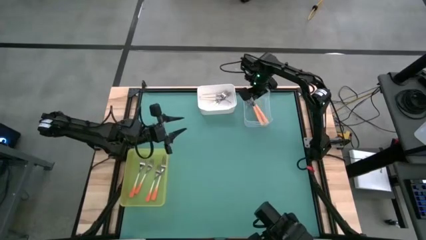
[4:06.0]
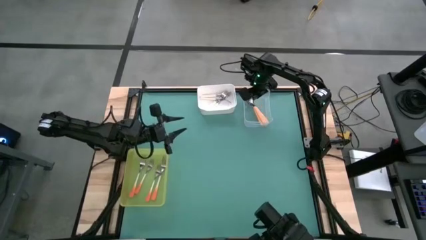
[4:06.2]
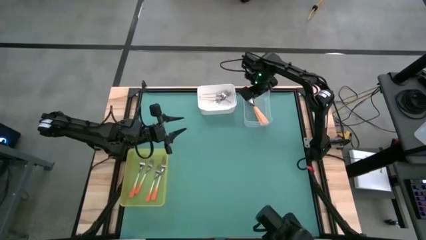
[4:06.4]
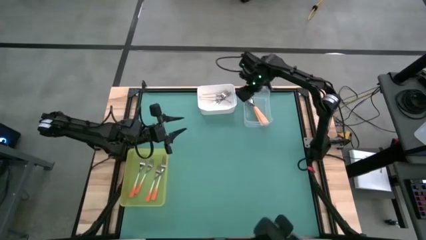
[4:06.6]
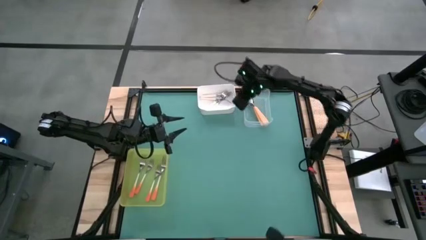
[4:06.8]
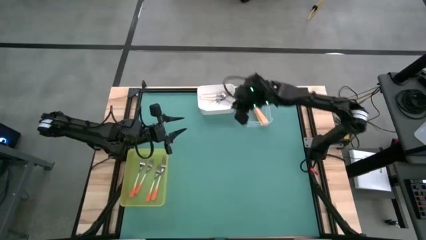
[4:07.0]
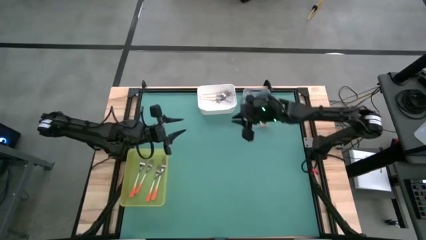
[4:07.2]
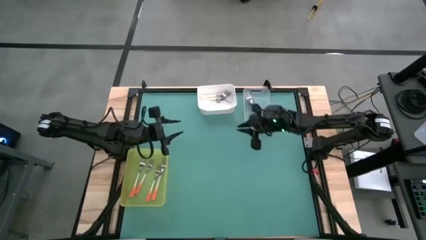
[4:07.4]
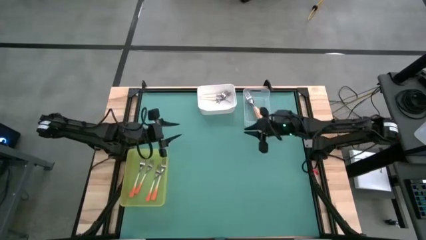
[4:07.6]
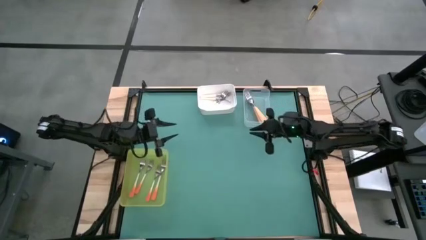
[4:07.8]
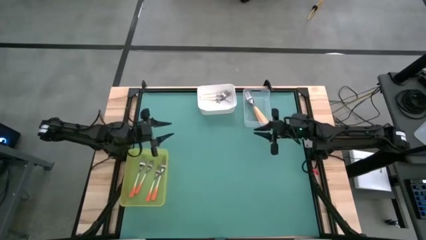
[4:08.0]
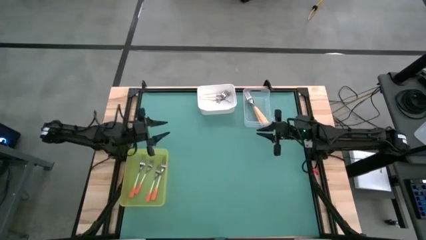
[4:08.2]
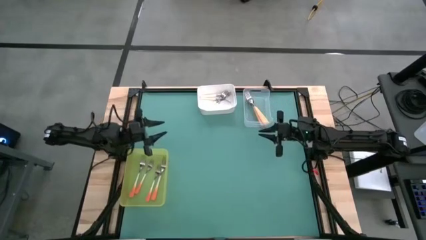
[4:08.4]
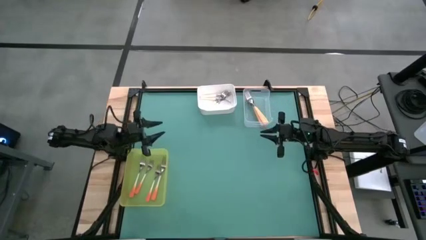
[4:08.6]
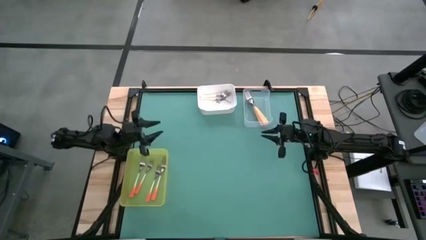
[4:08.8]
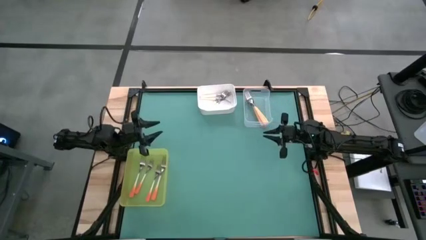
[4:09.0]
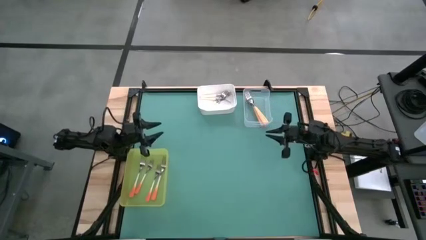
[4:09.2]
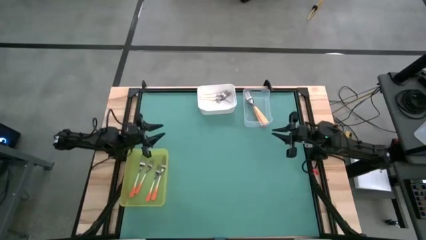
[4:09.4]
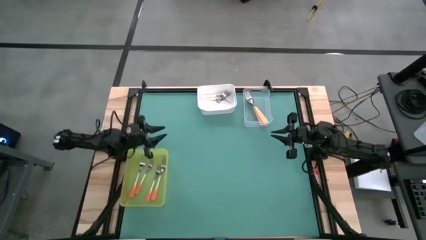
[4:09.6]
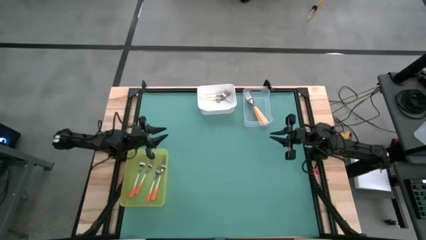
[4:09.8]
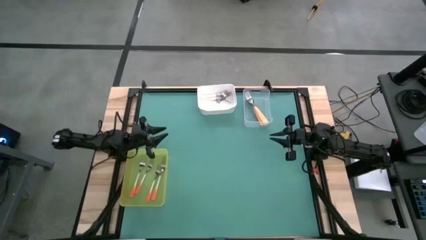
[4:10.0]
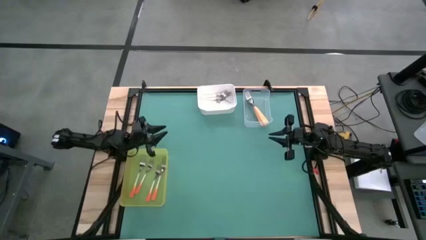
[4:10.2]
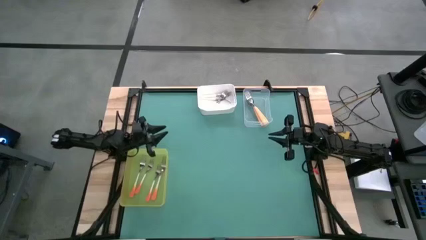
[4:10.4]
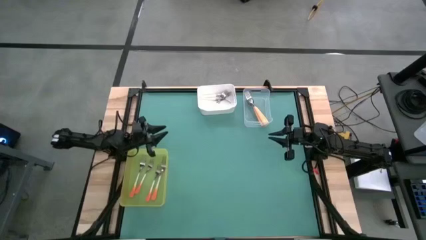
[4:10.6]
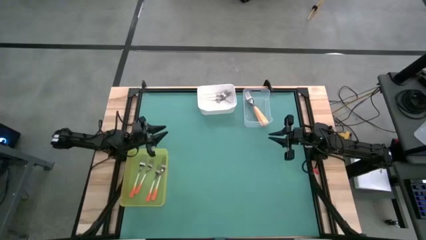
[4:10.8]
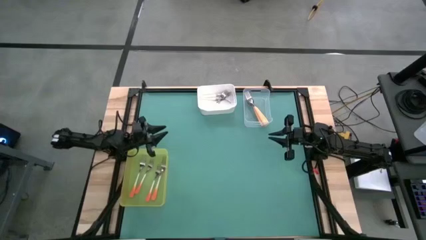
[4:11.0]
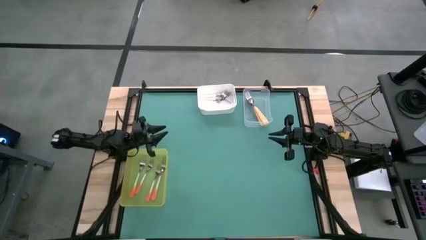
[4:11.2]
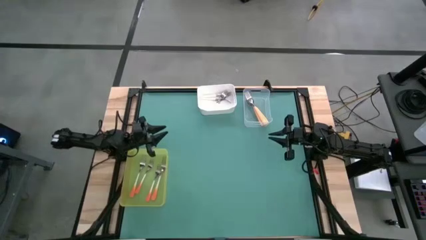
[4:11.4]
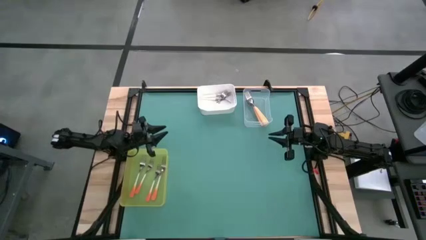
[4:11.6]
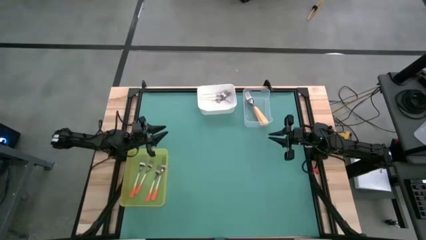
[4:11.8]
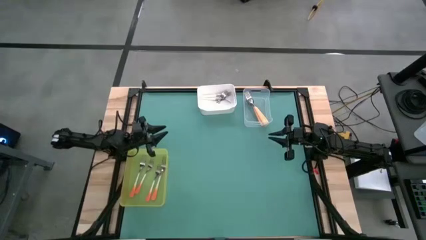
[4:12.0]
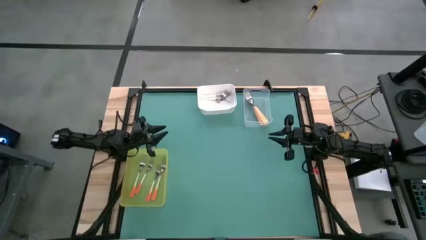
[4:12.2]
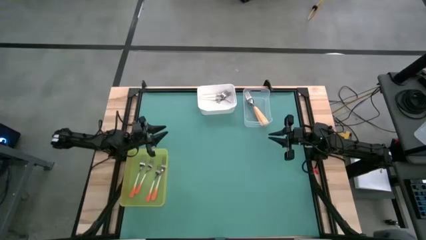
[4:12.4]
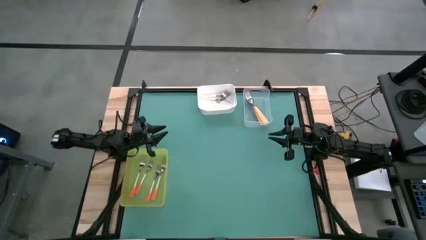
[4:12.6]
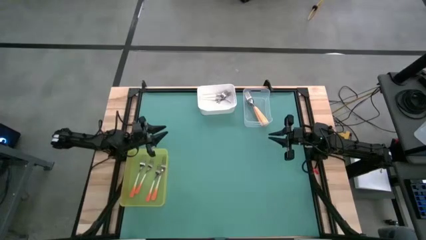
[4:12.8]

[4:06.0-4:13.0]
Task: Sort silverware by color (type)
Return to Home Position

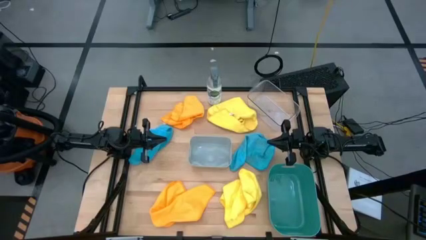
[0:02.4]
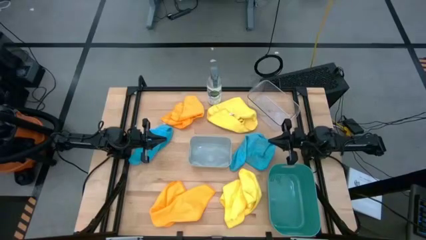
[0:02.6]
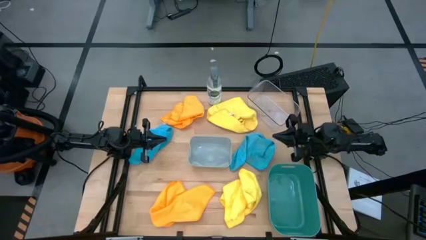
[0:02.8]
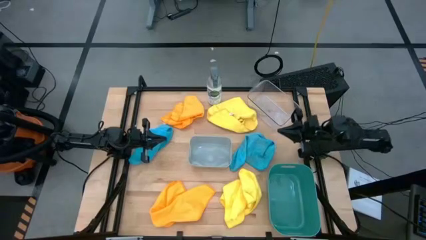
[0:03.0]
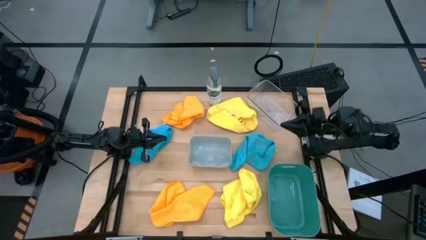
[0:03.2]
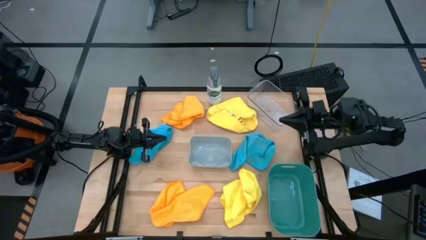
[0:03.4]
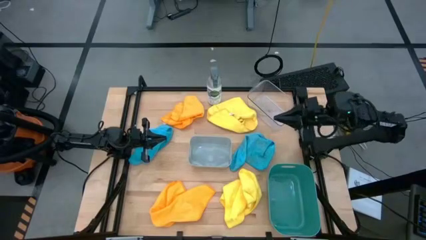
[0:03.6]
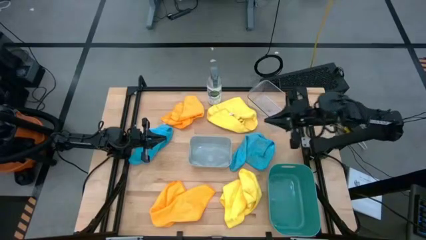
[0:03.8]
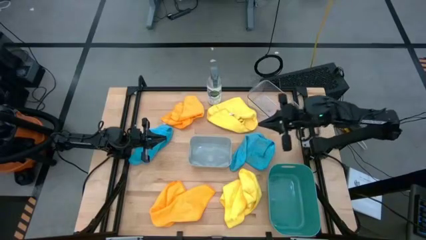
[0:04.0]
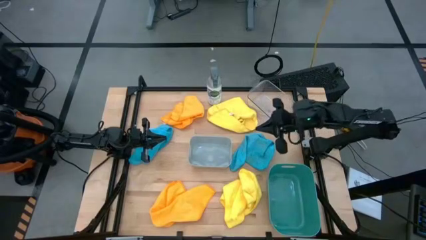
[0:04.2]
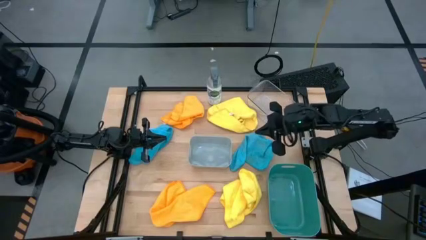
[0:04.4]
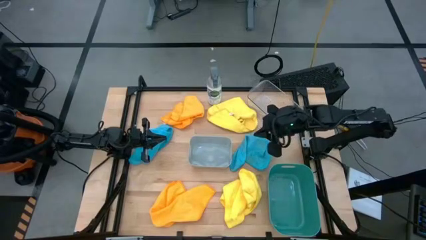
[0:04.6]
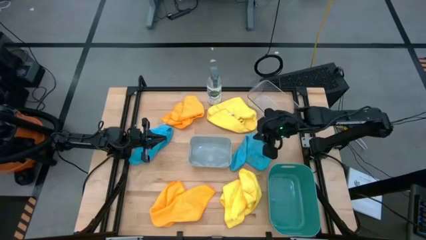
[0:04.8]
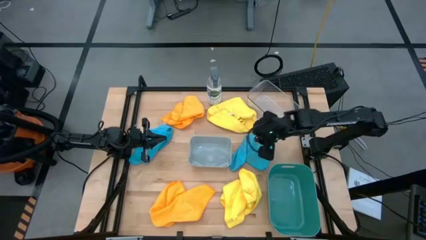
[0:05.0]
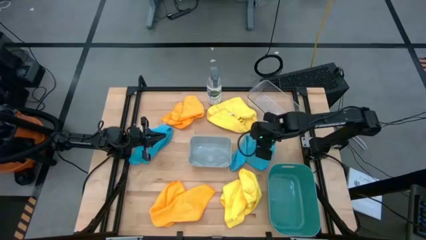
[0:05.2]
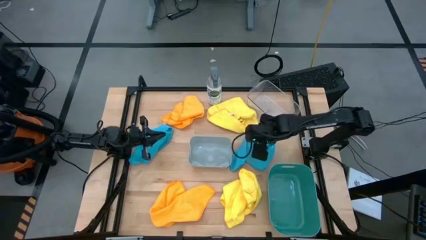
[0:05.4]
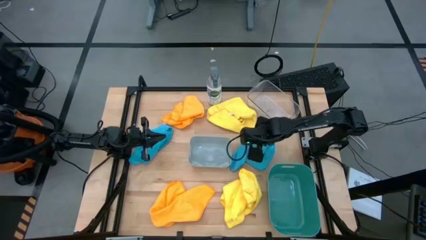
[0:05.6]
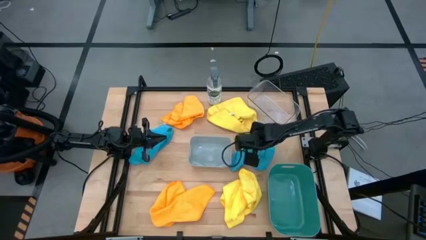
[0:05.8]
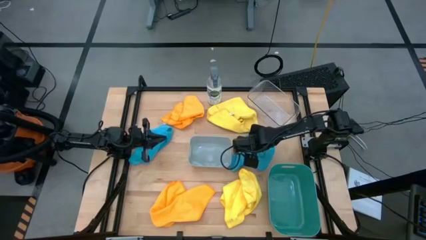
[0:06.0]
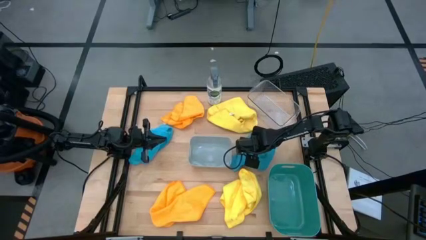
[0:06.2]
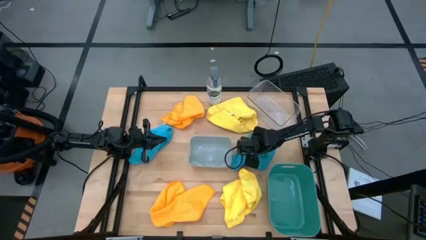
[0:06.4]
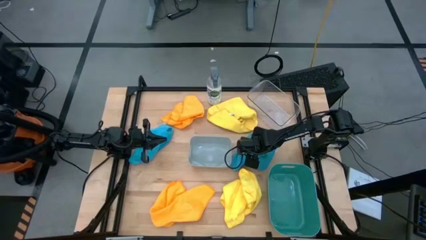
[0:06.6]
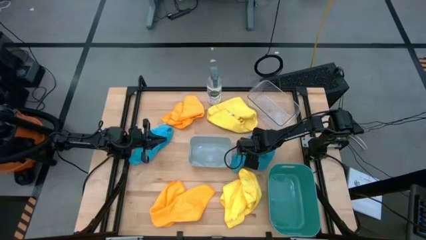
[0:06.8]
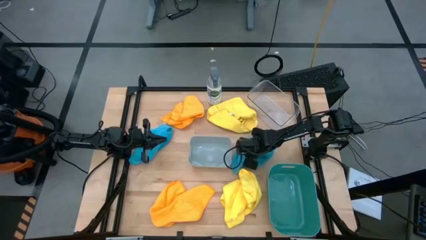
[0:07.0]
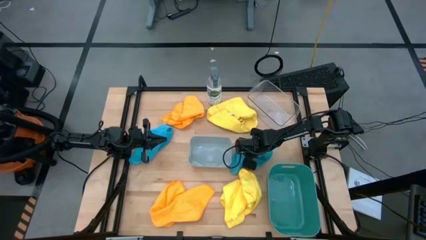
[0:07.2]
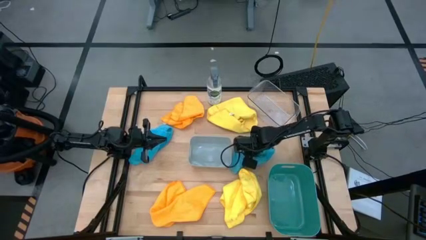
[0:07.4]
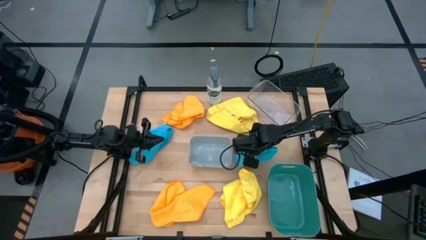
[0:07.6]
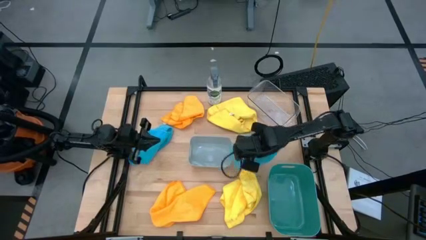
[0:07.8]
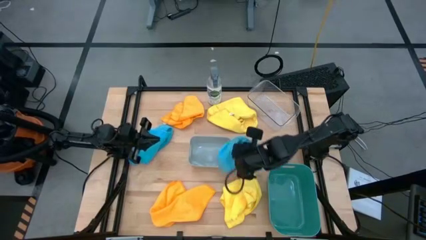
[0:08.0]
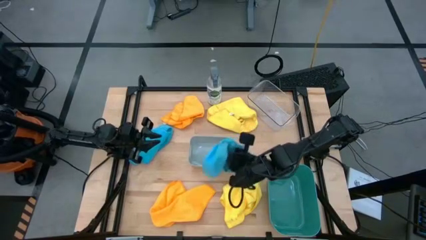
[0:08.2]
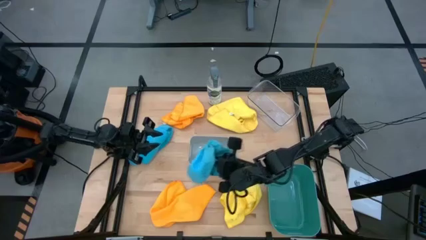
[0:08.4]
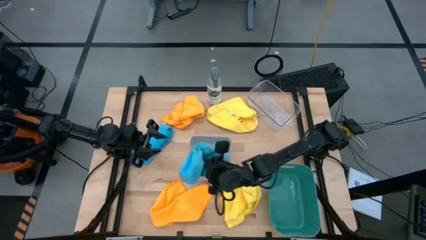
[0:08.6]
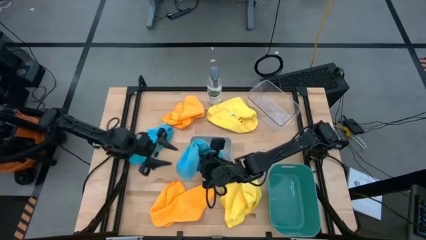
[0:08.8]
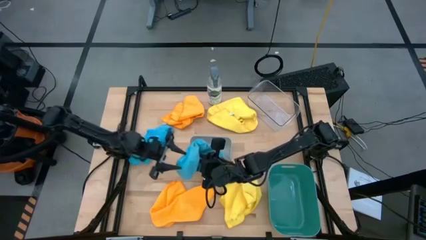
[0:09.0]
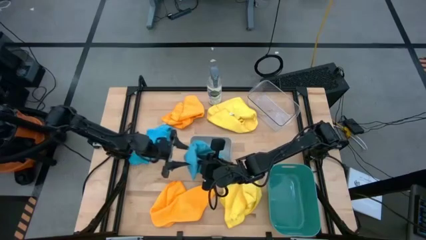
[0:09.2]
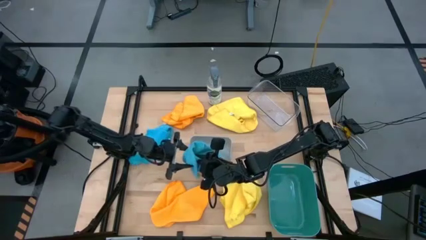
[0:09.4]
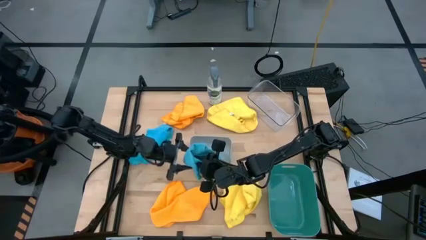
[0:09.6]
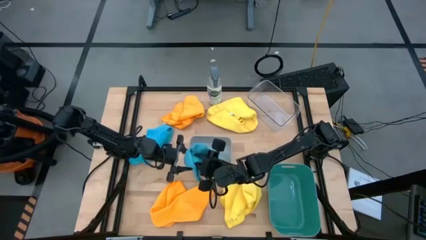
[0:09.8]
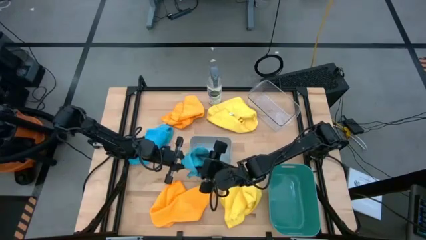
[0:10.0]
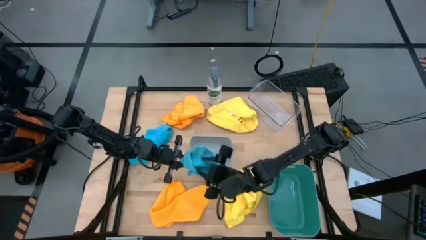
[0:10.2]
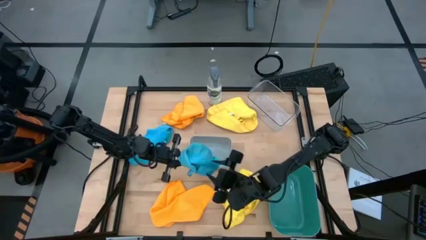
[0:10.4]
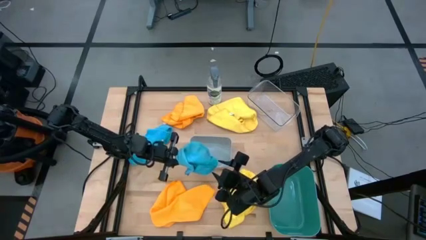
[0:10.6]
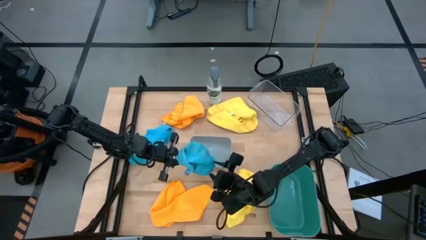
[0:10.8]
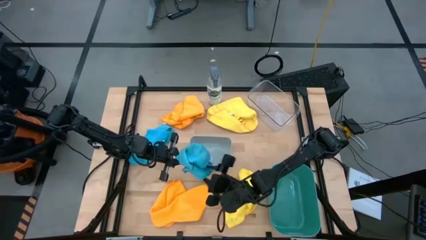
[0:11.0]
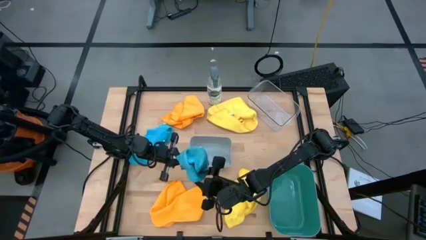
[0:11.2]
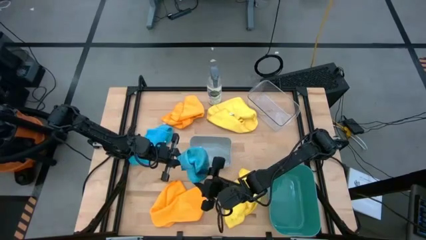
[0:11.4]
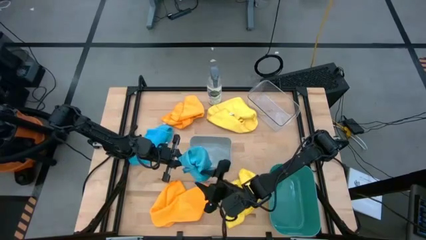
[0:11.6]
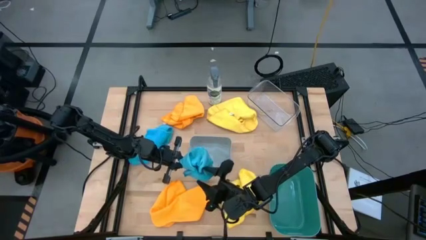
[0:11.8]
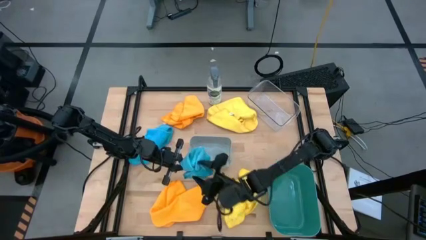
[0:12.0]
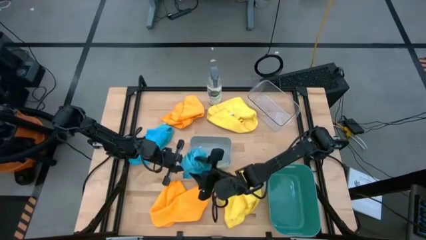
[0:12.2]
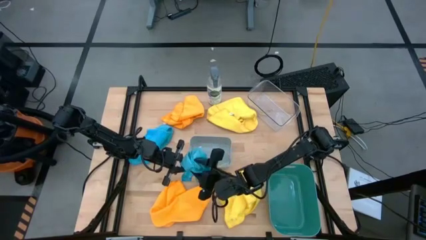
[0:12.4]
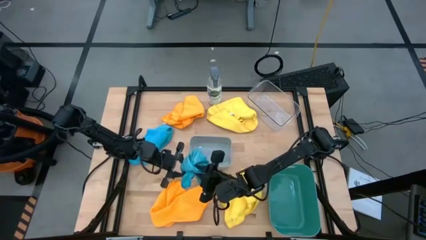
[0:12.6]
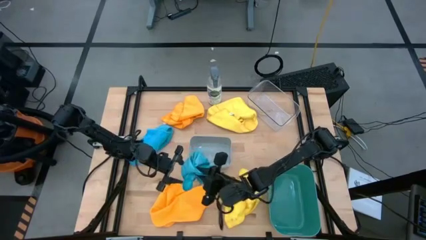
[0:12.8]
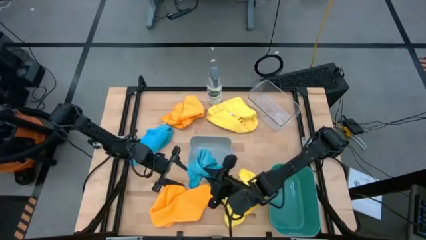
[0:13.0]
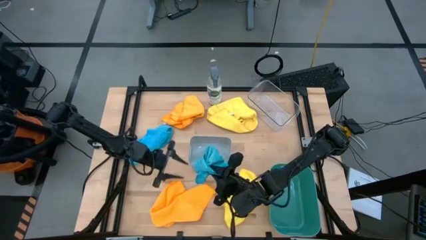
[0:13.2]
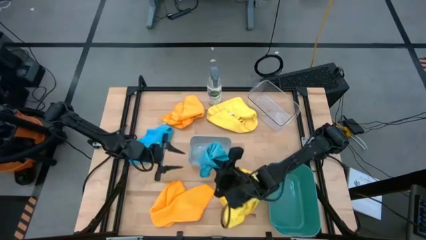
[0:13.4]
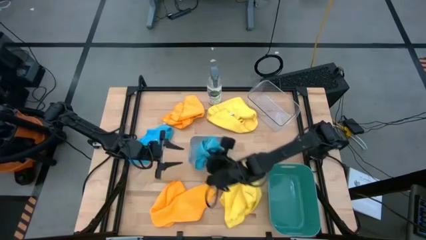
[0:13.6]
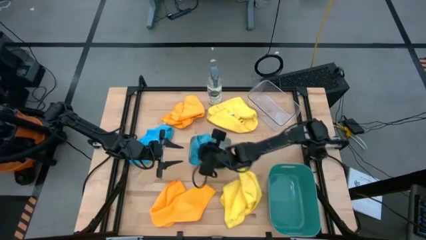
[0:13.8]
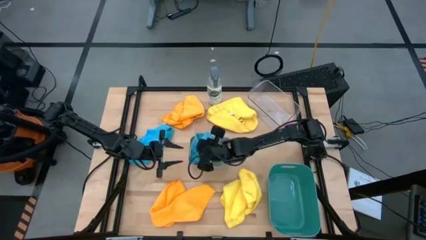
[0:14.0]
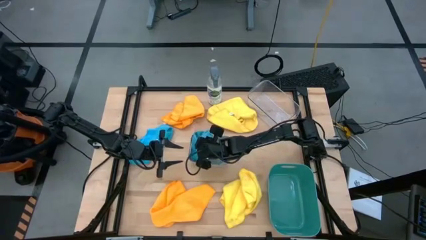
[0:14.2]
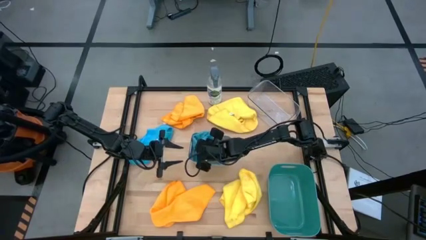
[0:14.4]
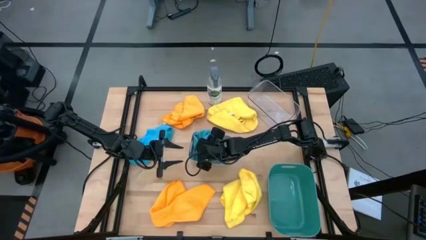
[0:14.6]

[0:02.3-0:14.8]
Task: Sort microfiber towel by color & place in baskets
Put the blue towel on the right in the white container
